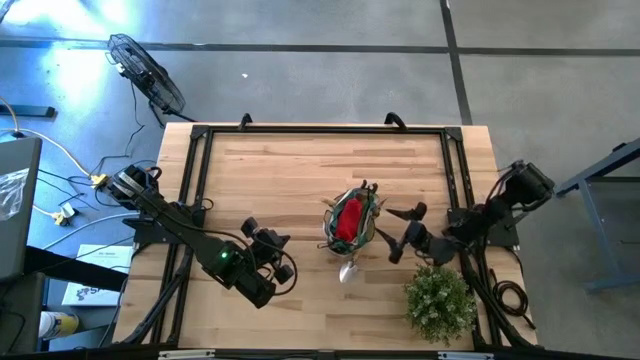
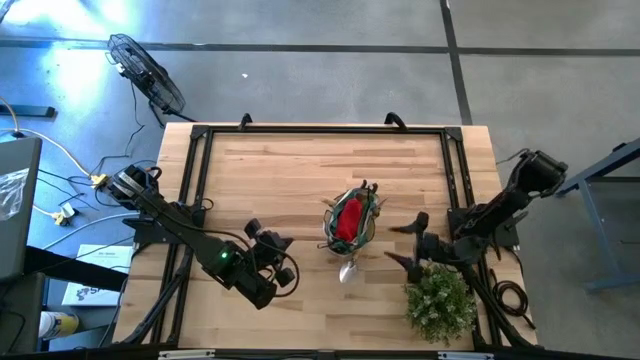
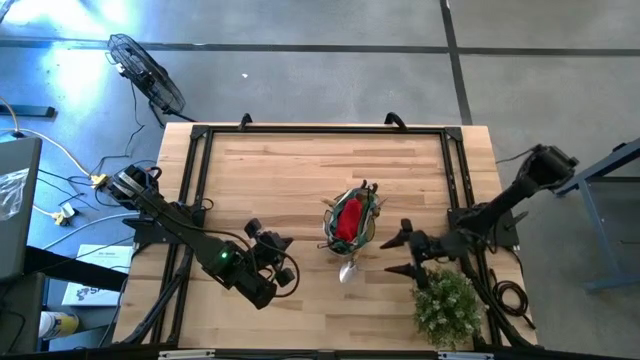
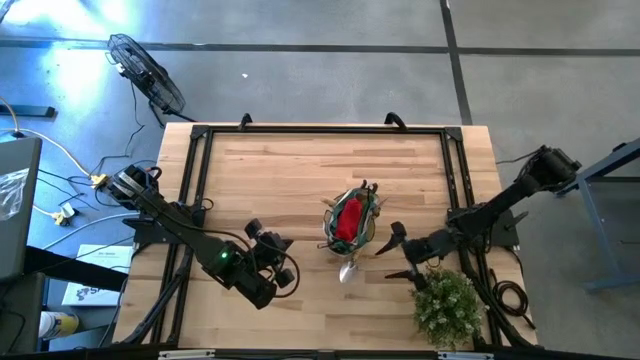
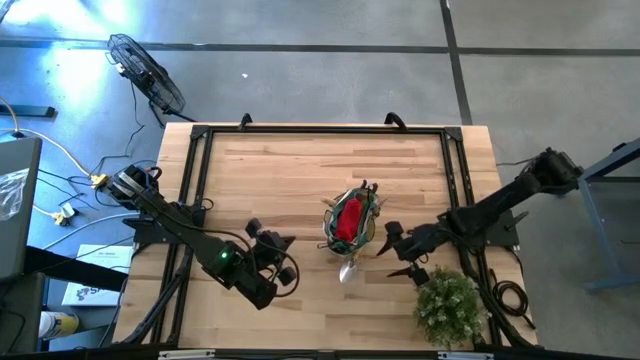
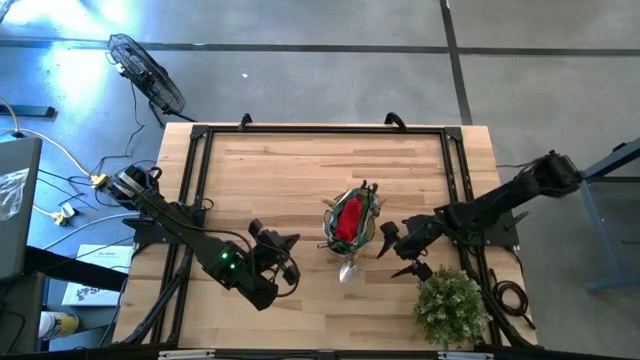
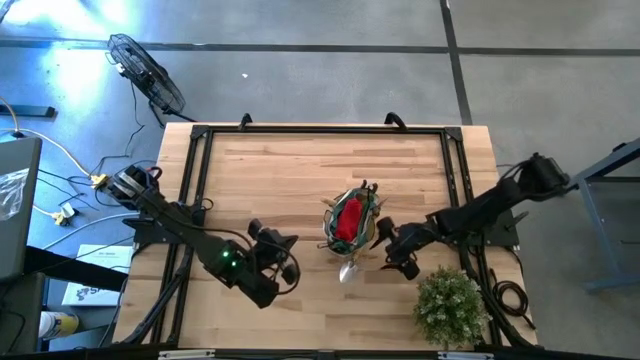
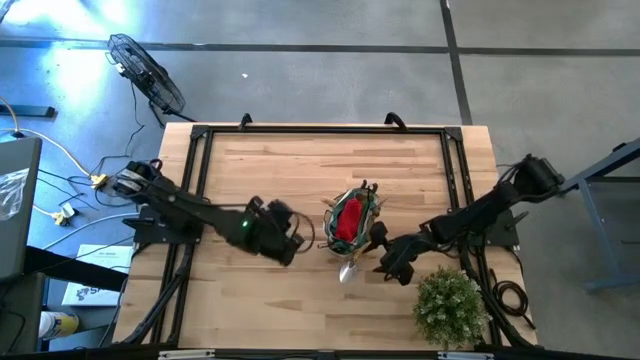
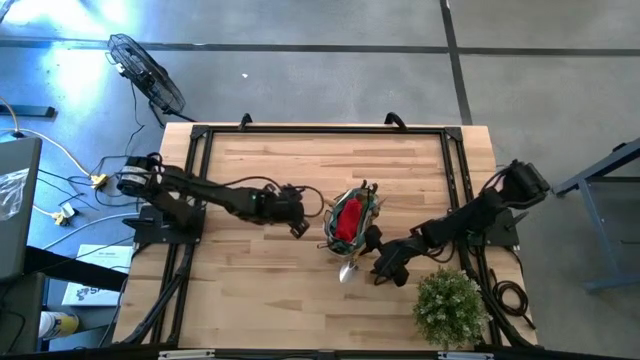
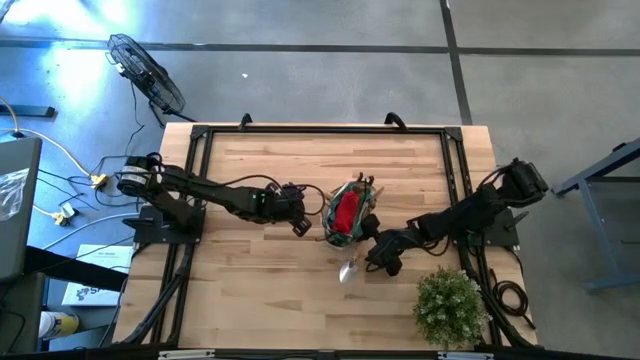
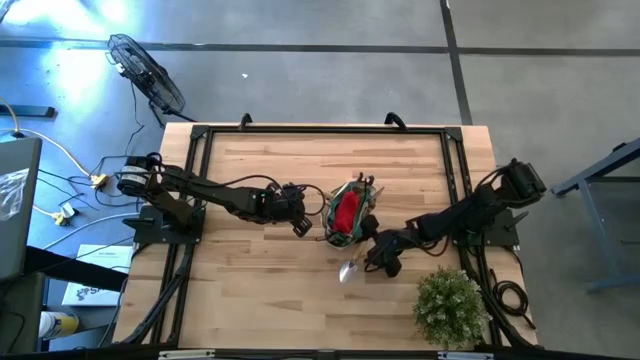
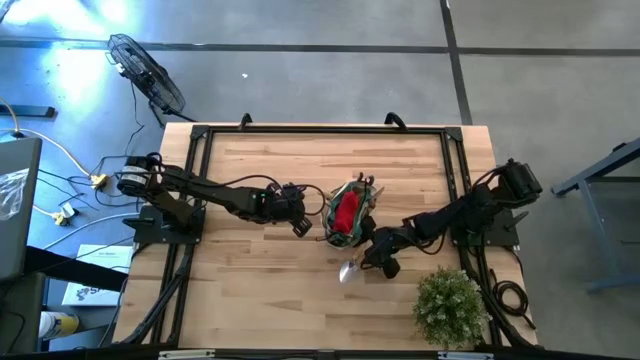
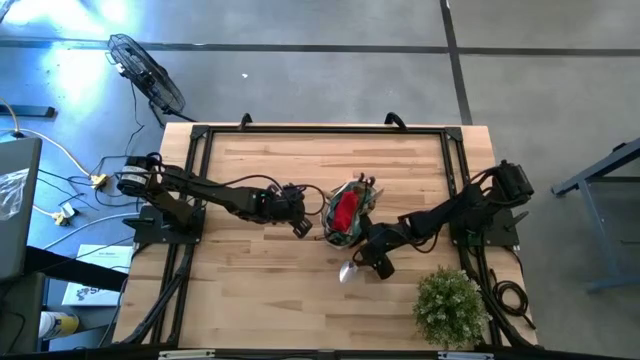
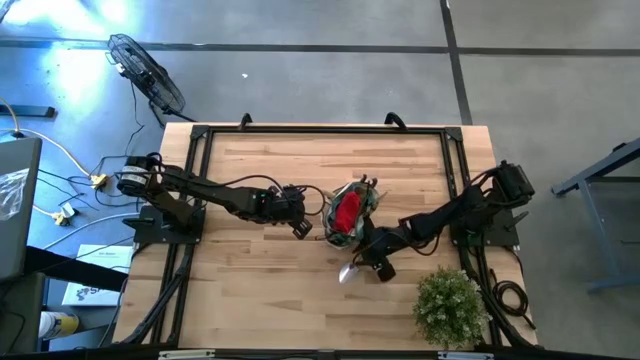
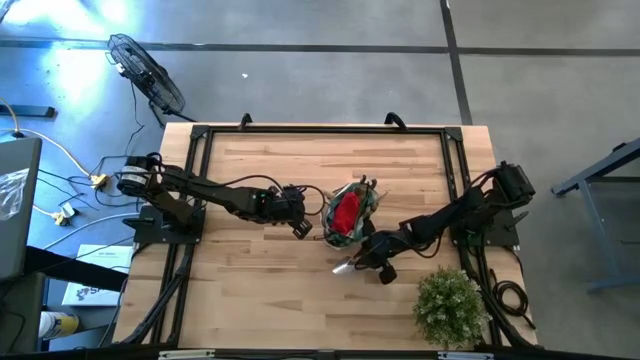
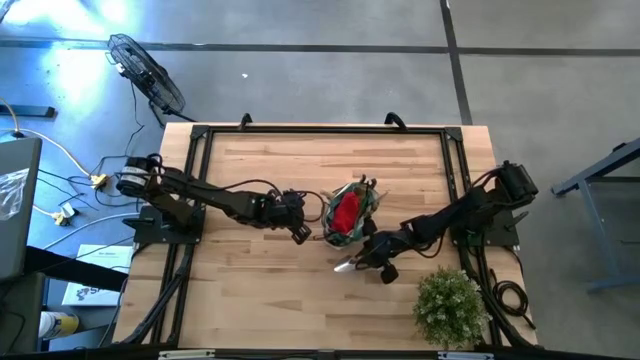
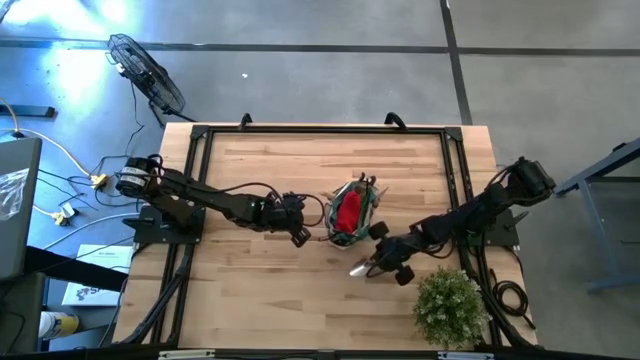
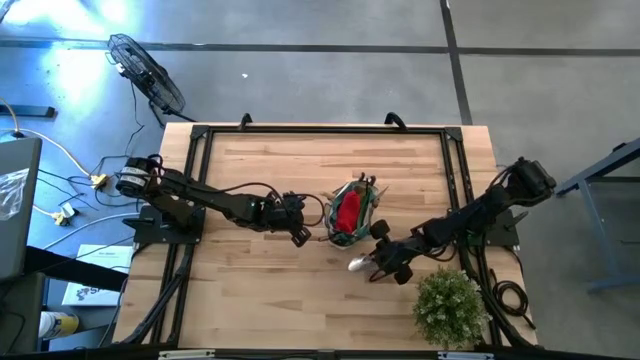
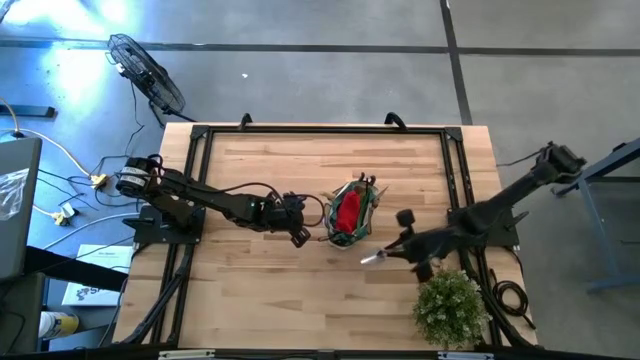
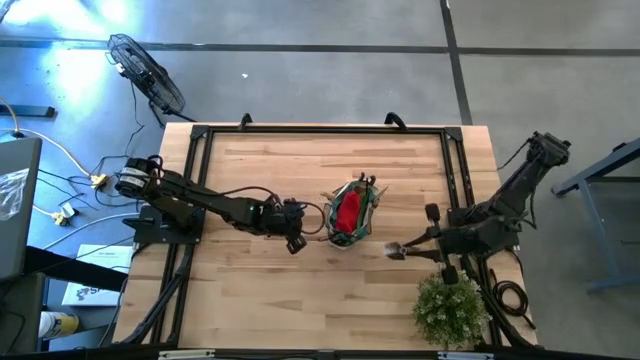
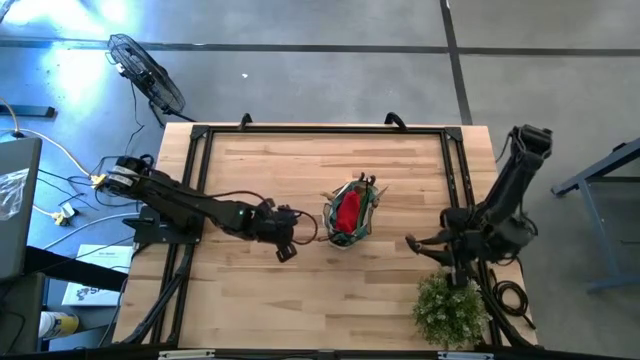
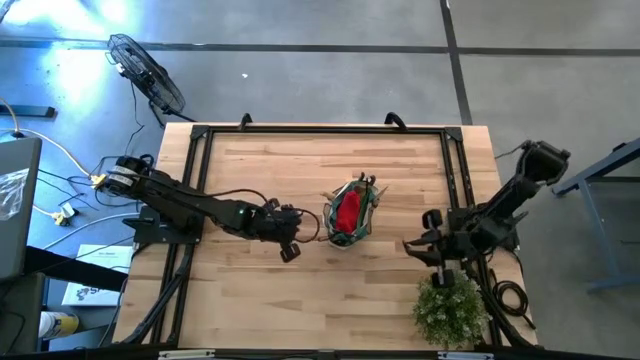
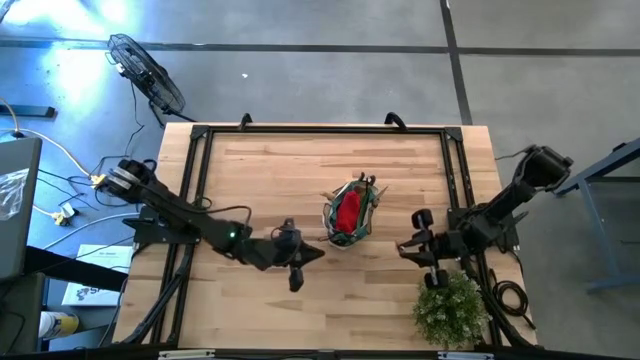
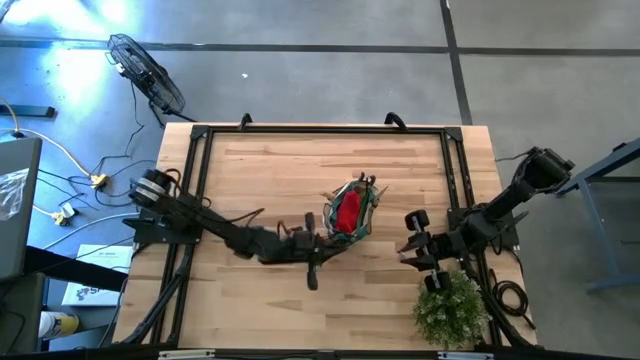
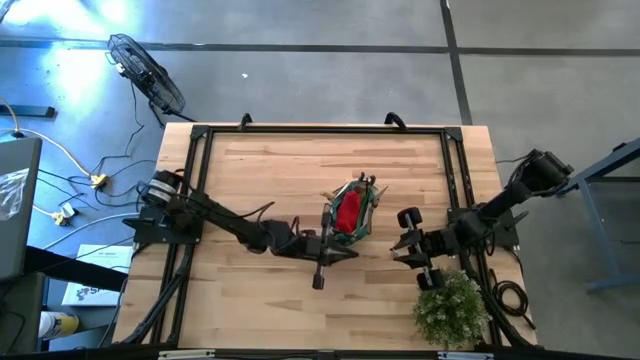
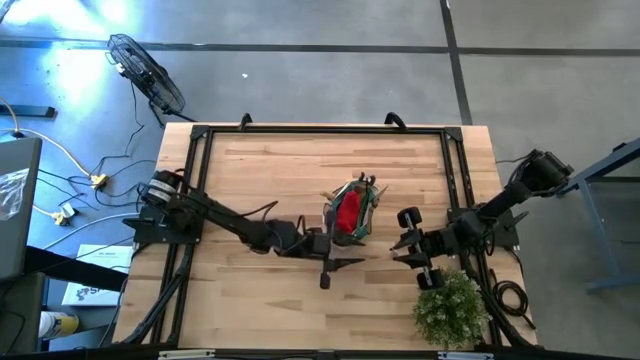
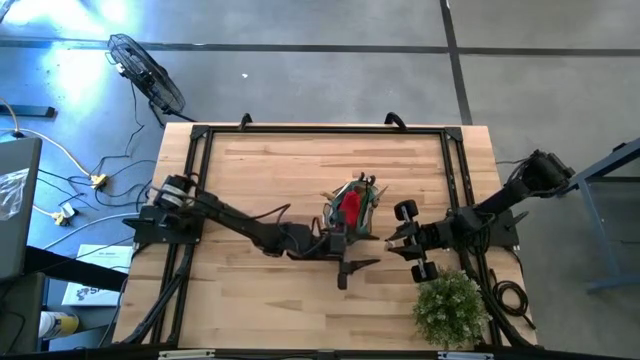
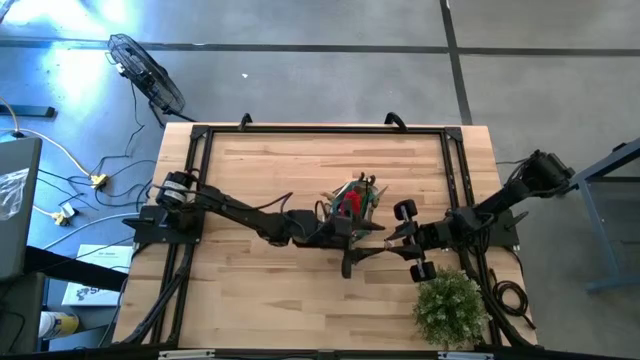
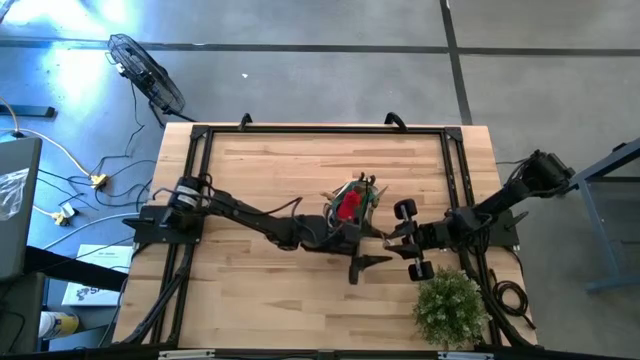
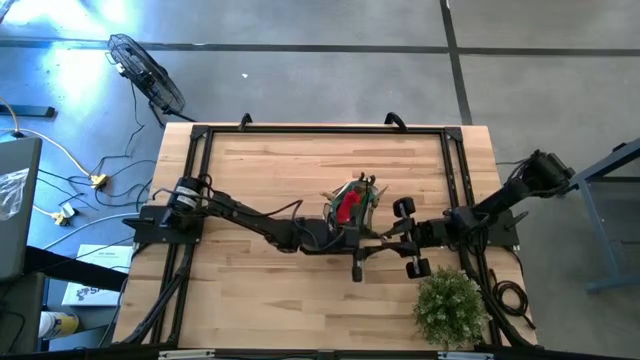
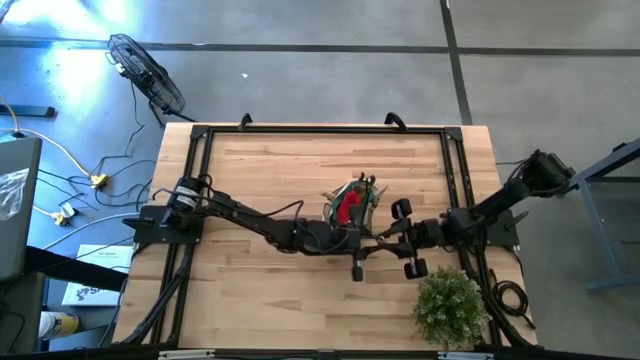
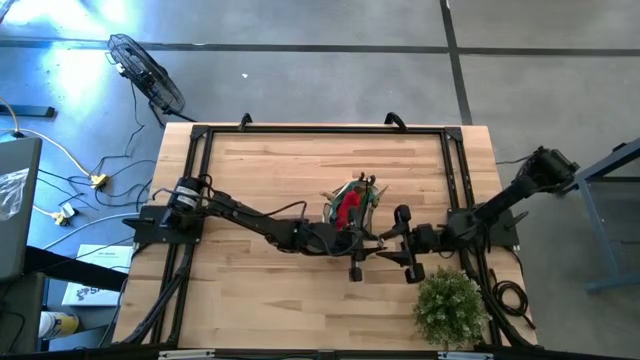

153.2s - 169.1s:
Task: Pick & Place Garden tools in Gardening bag
Put the brown trowel into the green gardening bag

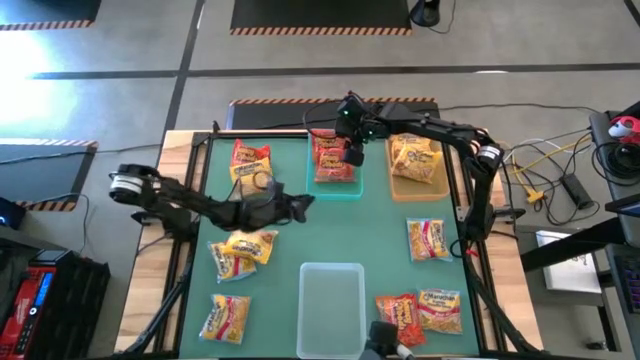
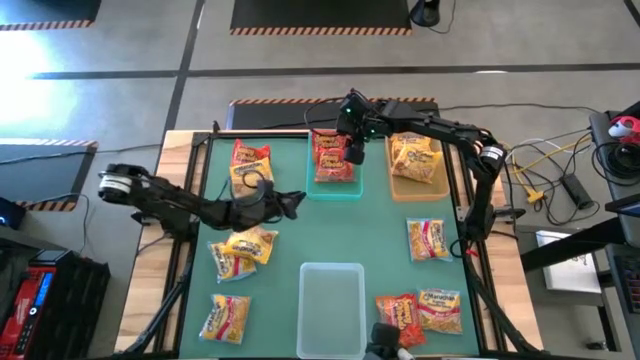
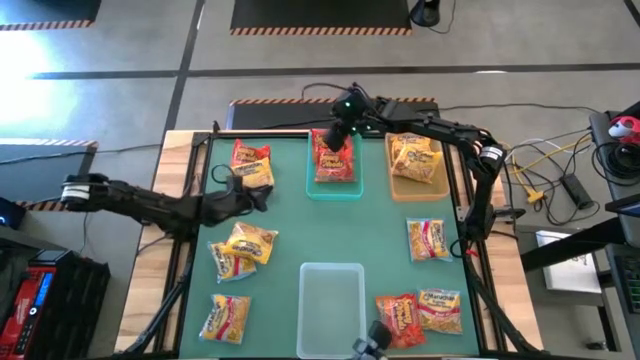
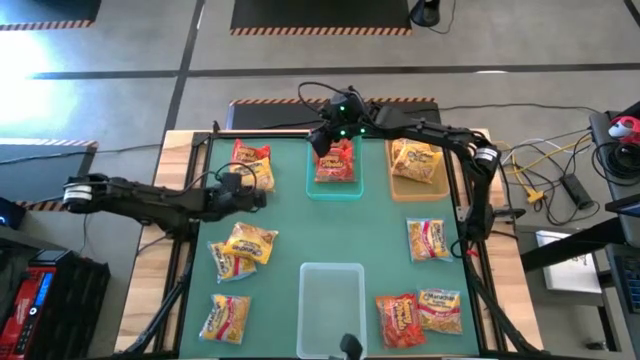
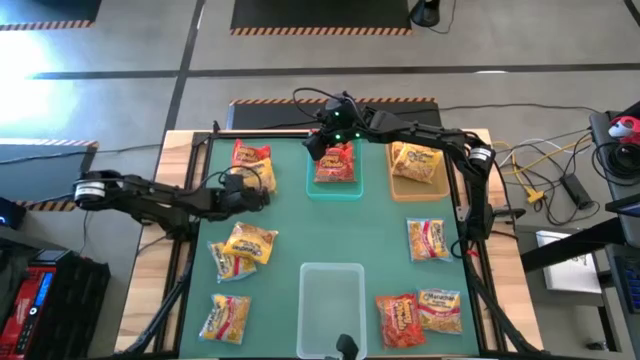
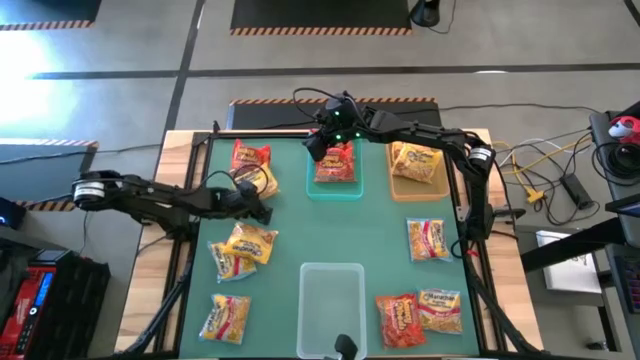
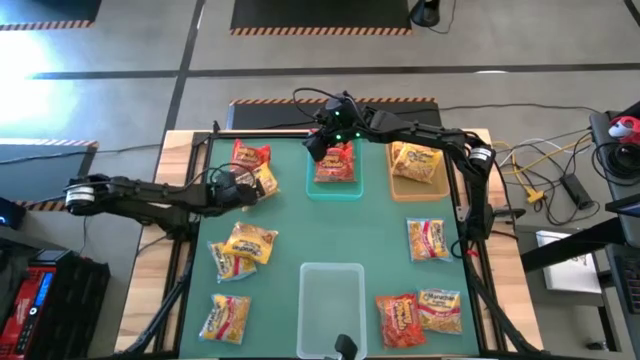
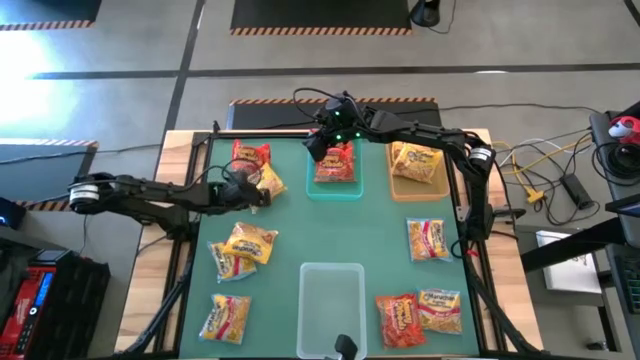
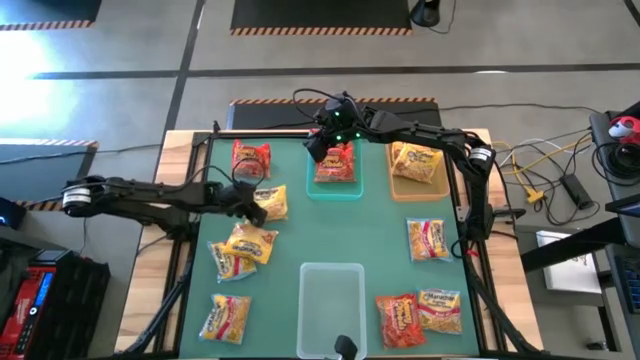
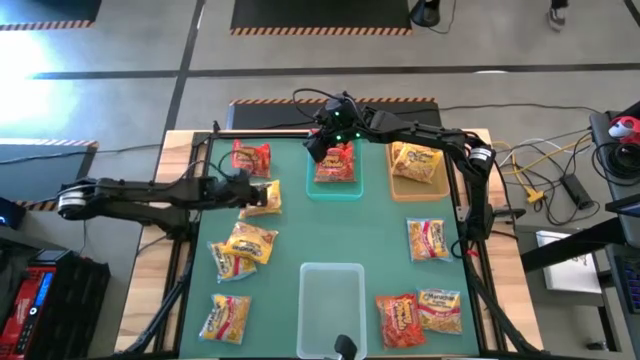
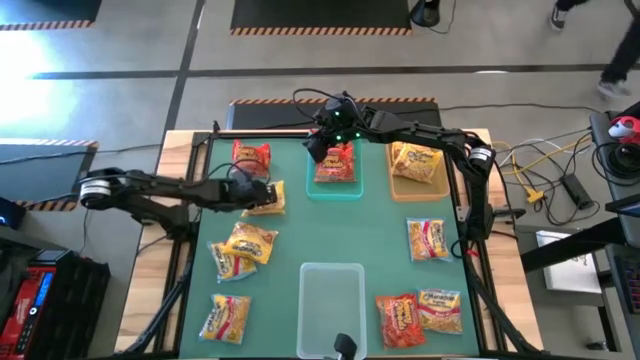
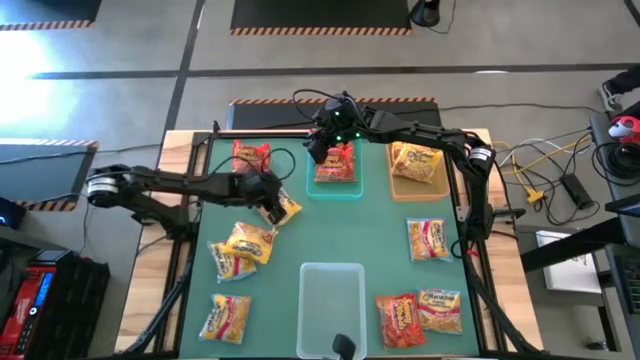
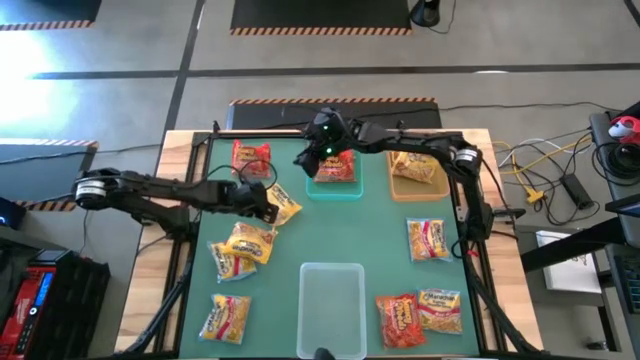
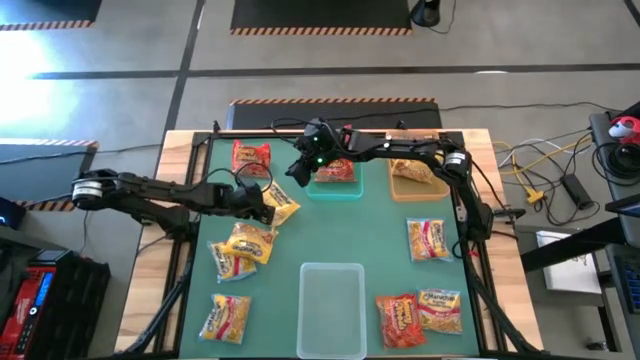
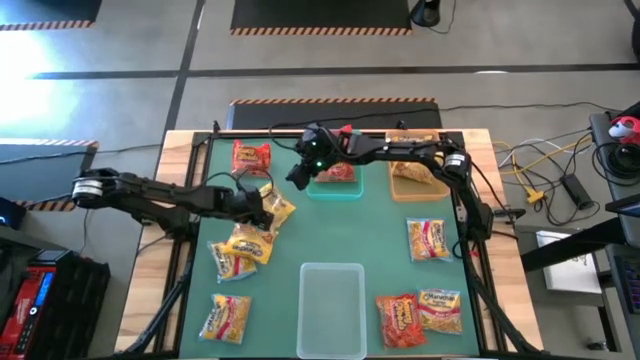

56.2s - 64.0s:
Task: Sort Maruchan noodles
Put the yellow noodle pack into the orange bin
